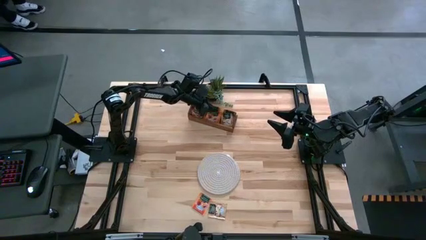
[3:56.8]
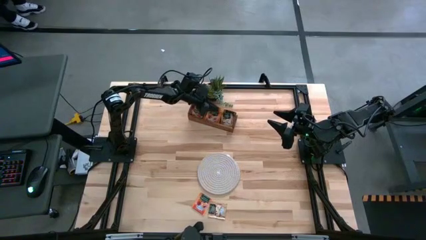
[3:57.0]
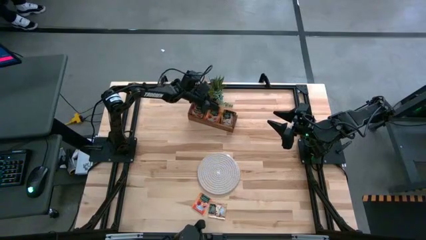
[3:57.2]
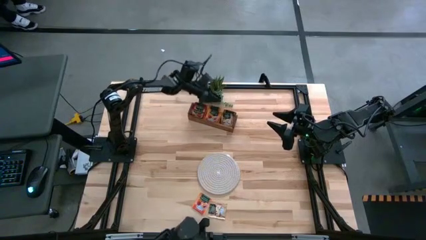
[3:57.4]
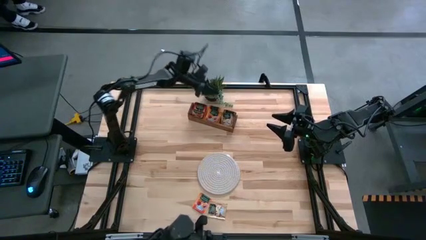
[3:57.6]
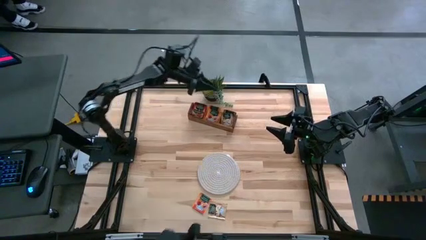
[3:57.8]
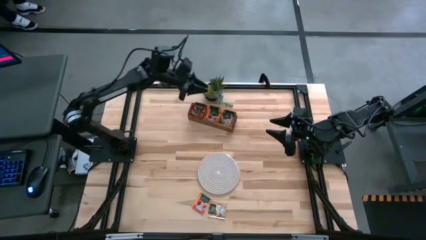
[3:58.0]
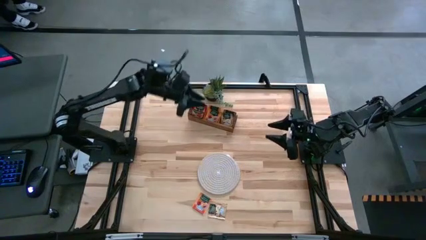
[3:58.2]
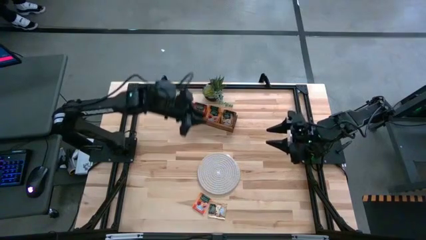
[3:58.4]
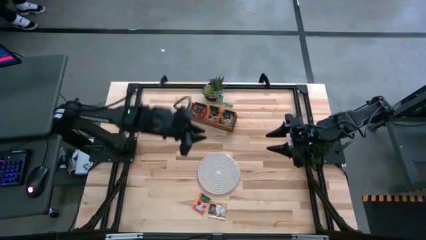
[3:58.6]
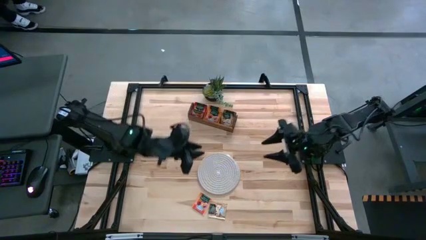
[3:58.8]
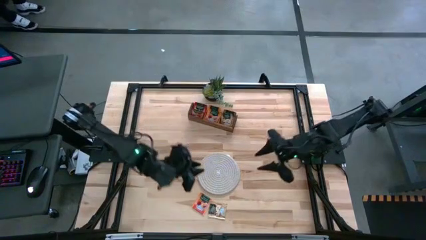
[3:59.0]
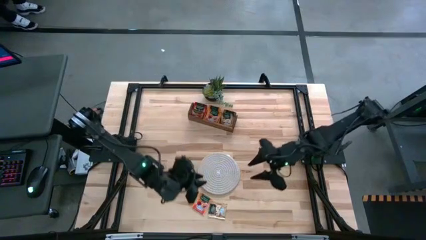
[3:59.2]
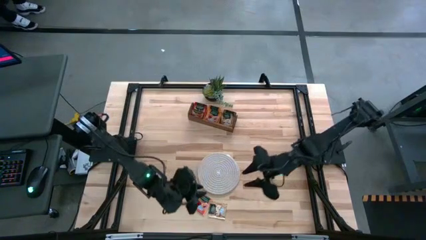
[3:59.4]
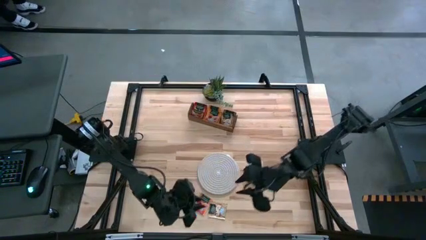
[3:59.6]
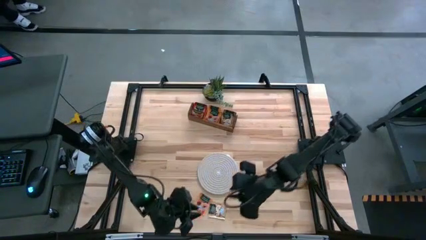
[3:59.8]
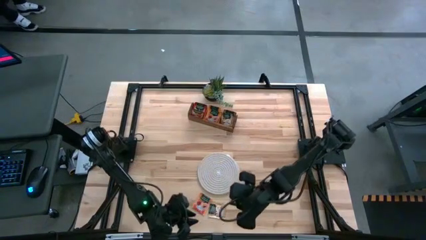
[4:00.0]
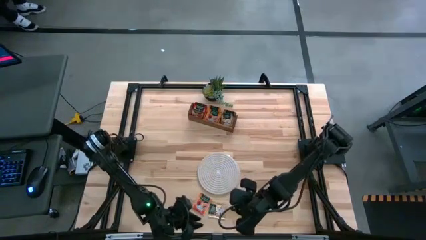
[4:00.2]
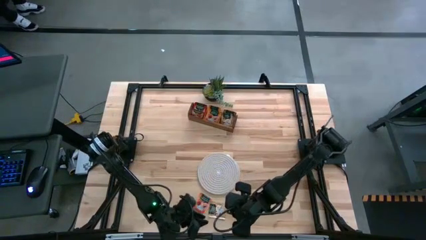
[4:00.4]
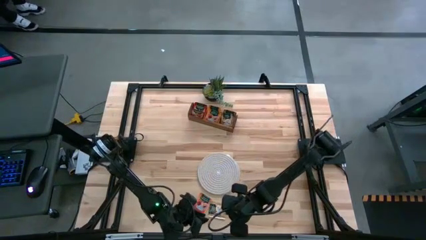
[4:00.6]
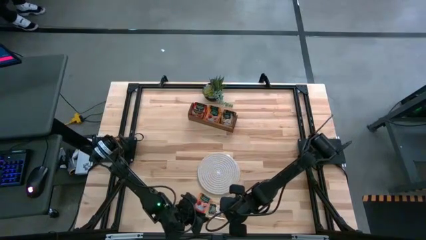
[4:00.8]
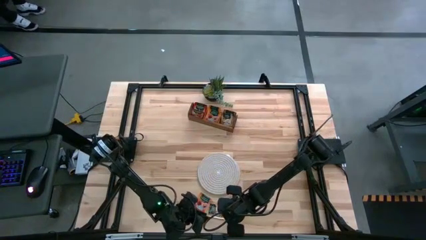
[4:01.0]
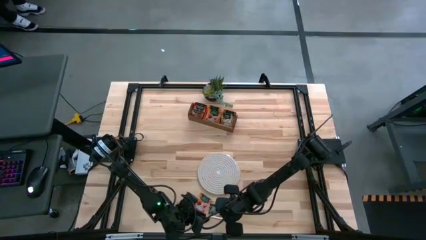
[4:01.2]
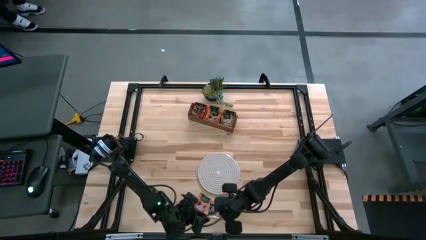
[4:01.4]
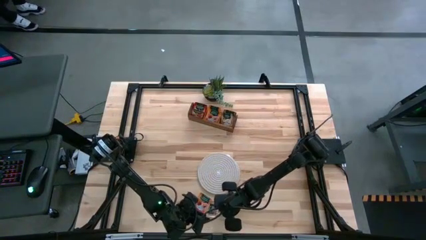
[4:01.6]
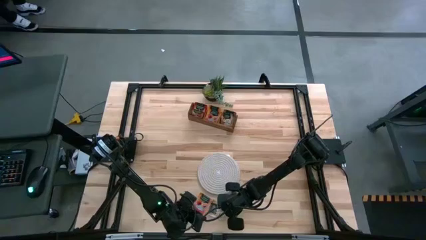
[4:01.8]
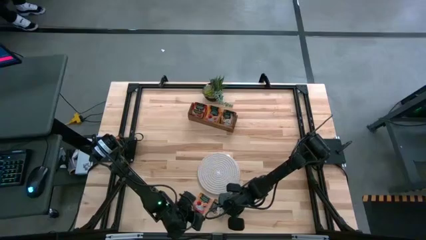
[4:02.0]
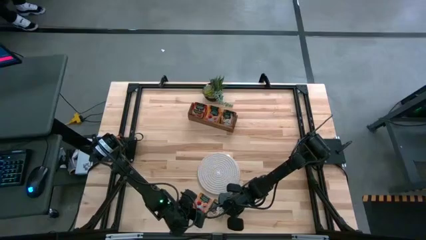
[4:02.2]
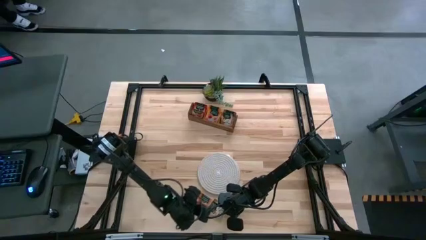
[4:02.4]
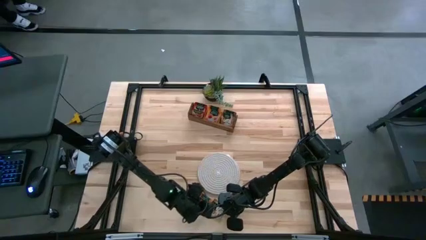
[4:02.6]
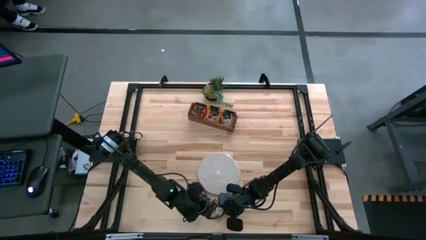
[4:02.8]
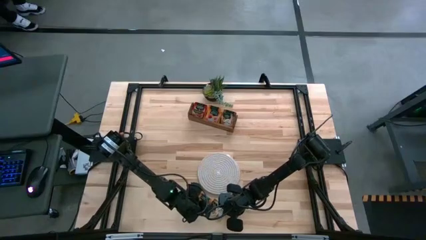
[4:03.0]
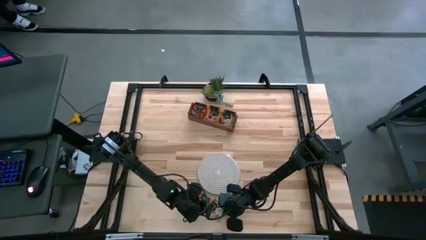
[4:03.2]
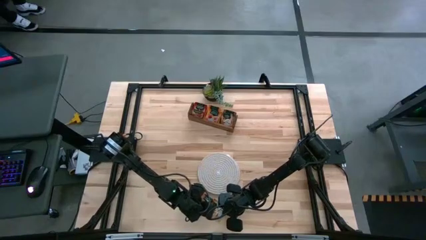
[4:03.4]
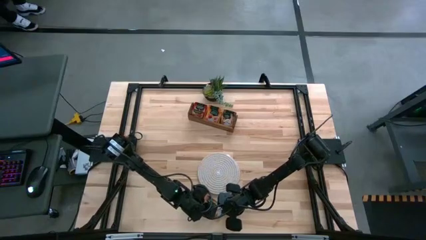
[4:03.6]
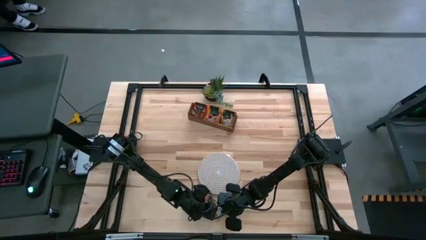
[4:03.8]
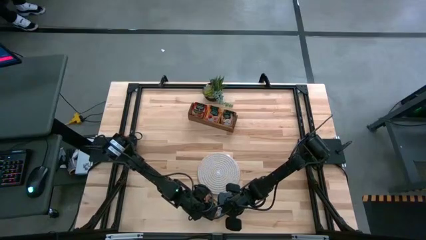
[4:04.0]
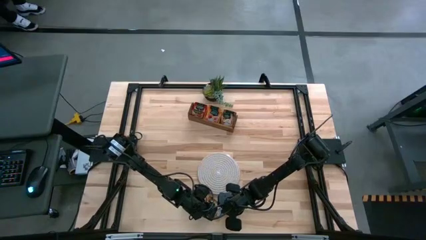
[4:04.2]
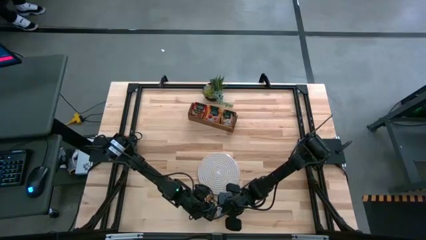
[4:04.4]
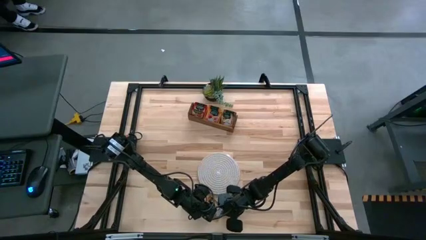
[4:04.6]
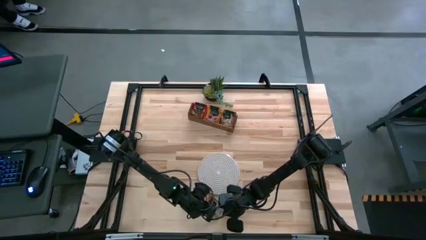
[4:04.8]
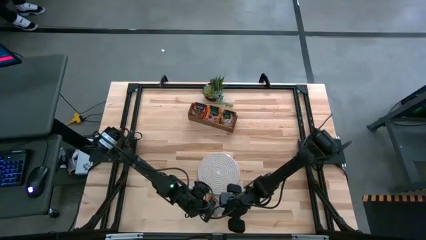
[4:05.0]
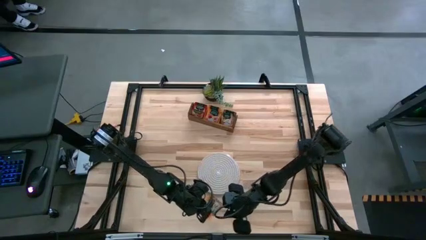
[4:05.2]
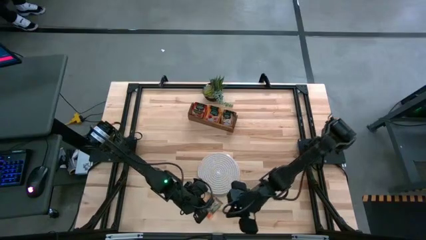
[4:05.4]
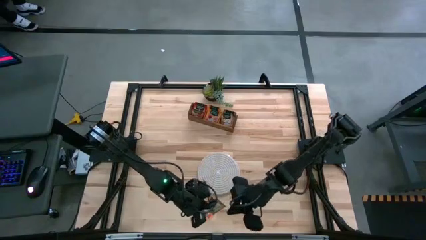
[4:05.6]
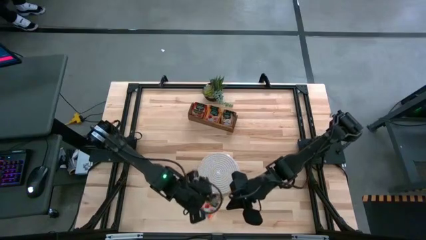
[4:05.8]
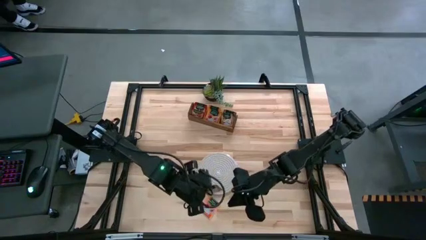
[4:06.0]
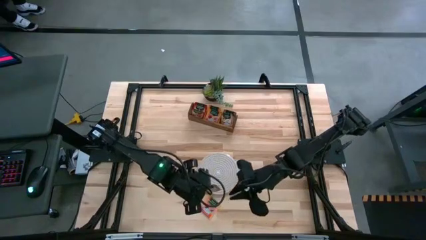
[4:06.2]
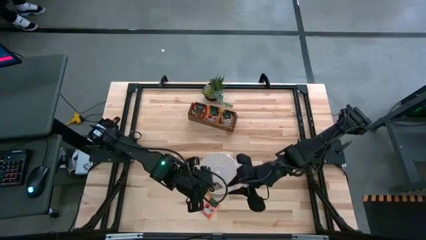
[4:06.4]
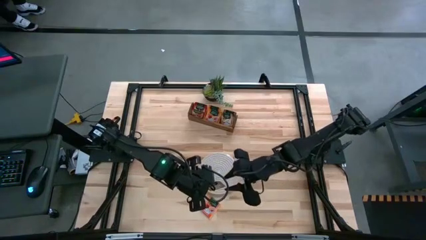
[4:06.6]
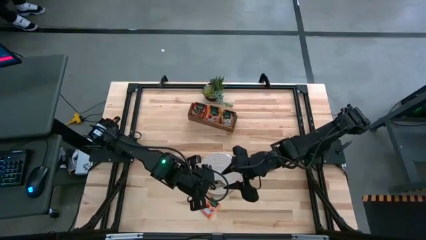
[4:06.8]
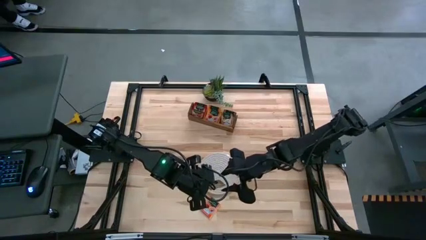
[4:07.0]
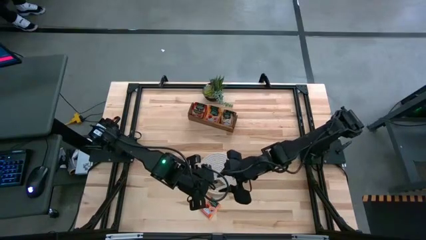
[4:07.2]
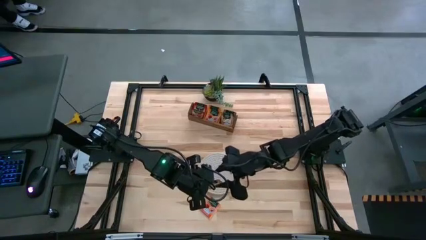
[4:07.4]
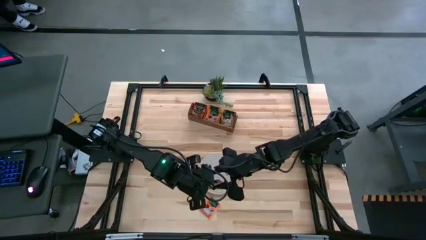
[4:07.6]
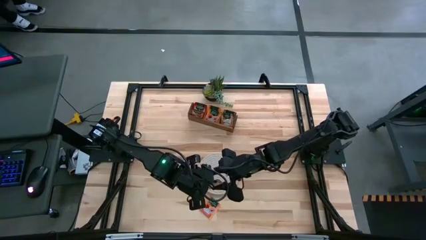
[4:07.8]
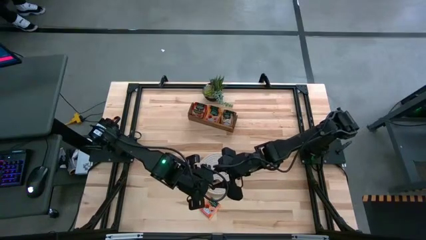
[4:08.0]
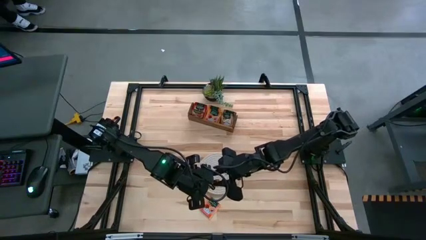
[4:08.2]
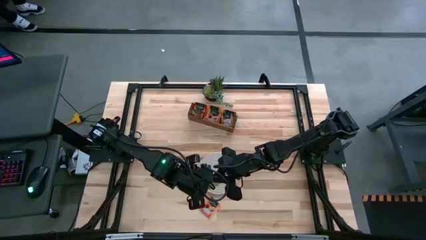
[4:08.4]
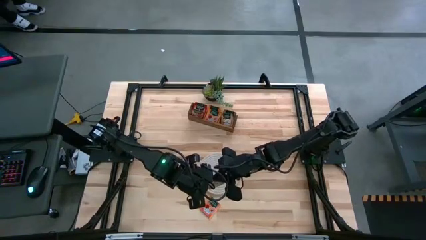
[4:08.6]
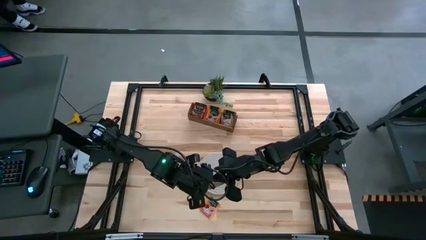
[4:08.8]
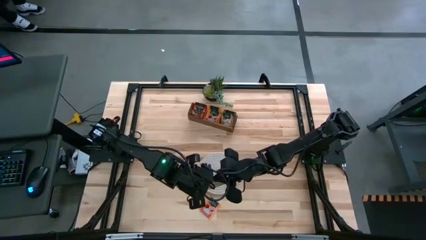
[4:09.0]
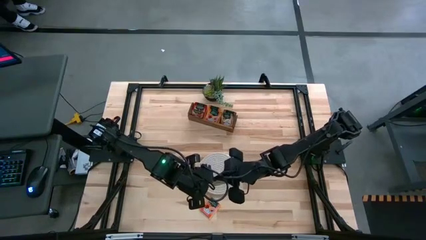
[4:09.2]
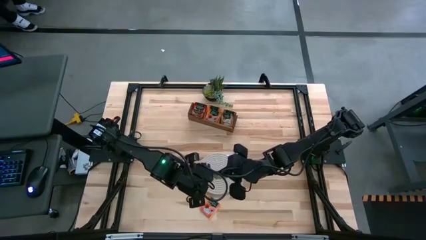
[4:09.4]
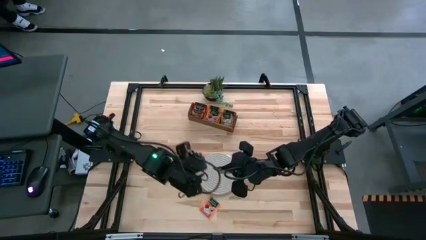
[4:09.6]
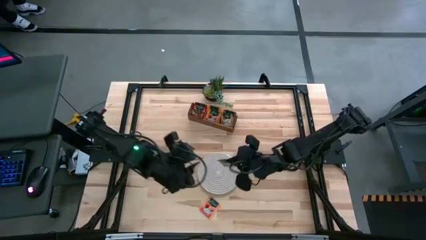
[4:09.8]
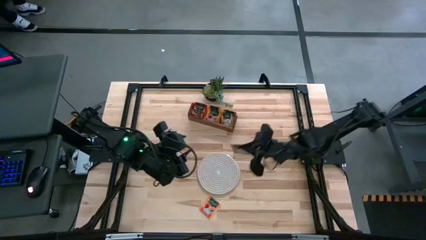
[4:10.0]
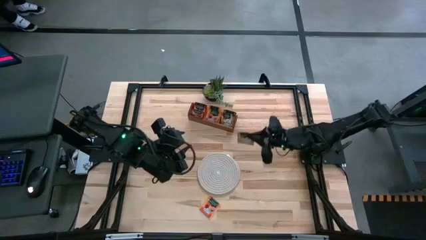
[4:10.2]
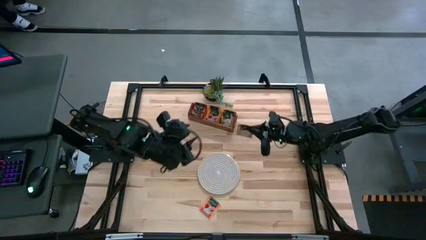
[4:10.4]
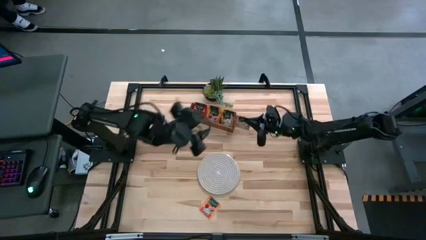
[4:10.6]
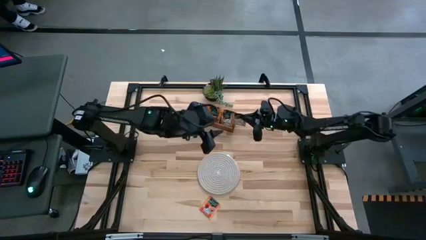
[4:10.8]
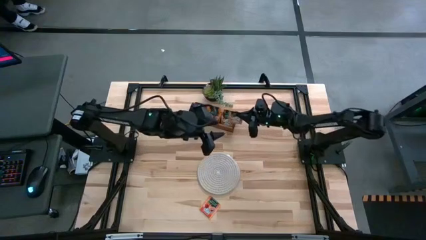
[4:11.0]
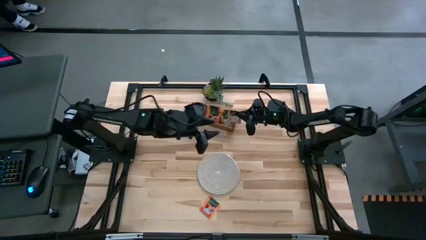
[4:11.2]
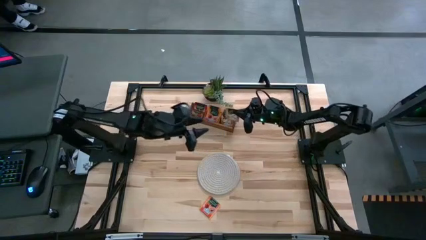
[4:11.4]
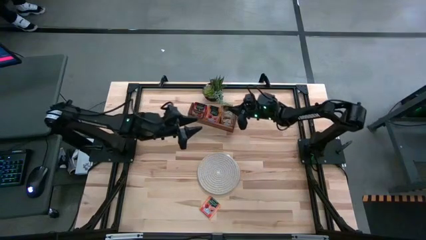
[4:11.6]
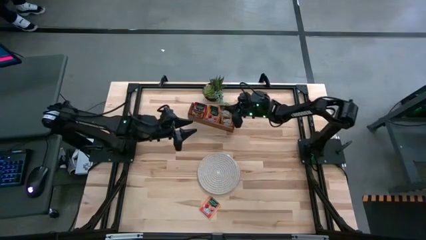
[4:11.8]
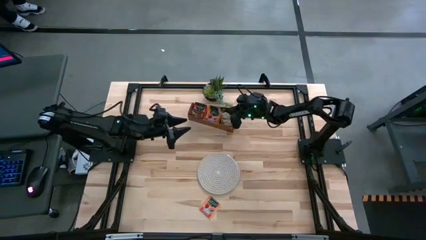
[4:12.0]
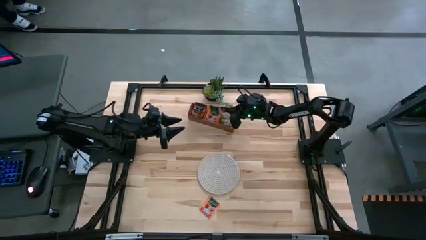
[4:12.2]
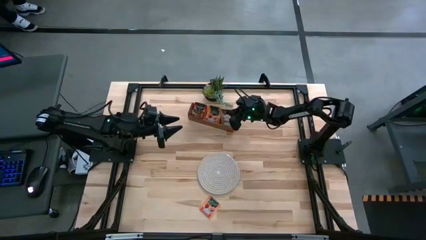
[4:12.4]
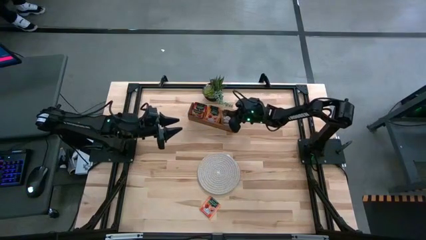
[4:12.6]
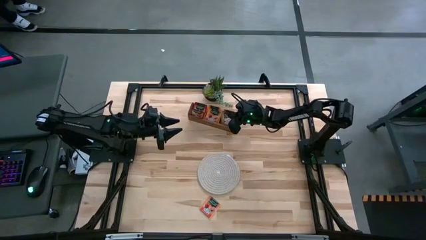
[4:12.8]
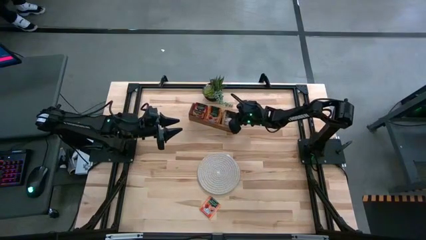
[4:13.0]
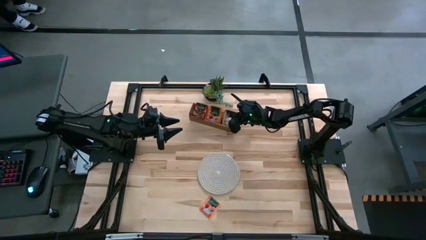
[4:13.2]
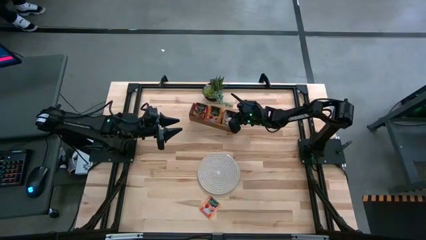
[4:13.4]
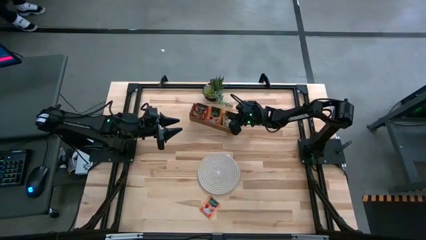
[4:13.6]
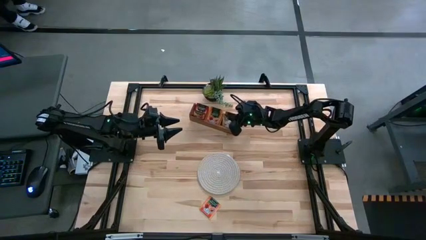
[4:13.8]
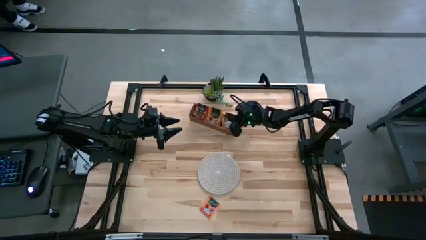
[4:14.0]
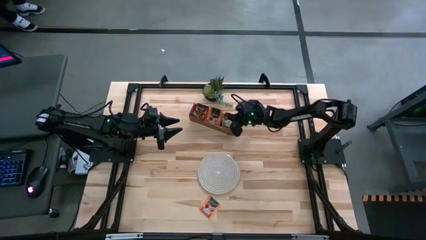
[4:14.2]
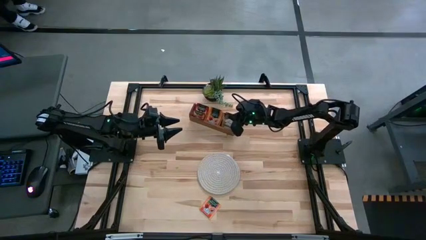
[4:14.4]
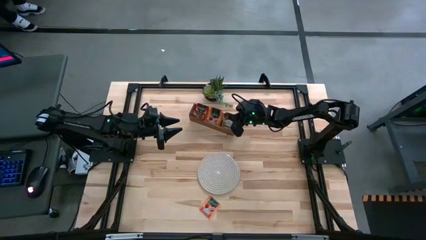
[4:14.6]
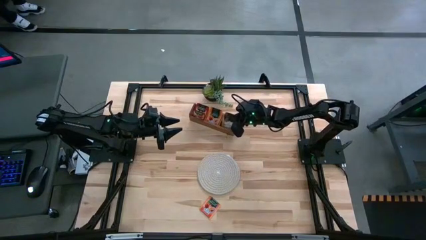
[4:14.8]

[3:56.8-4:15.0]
Task: Pick & Place Tea
Put the light brown tea bag into the right section of the wooden organizer
